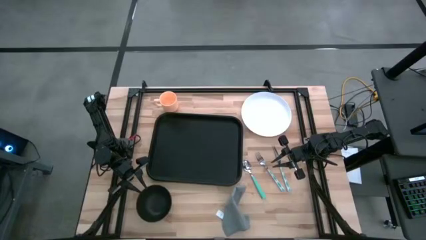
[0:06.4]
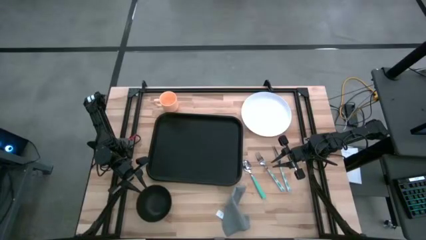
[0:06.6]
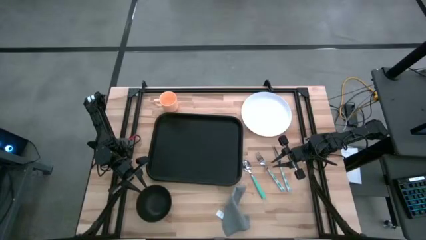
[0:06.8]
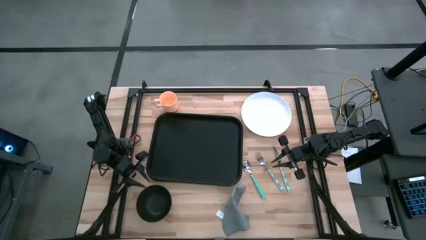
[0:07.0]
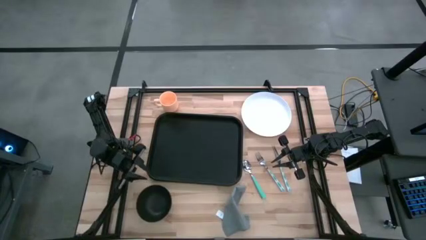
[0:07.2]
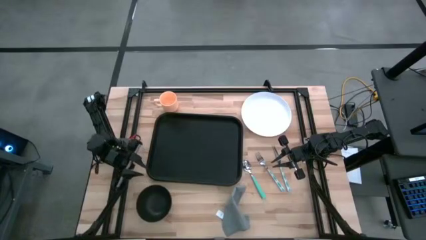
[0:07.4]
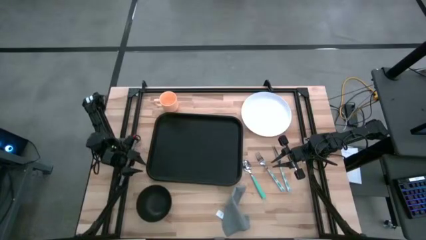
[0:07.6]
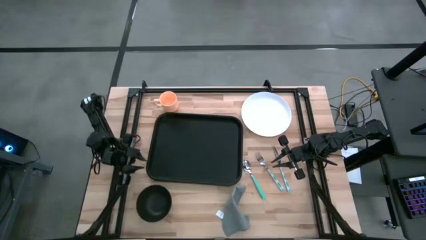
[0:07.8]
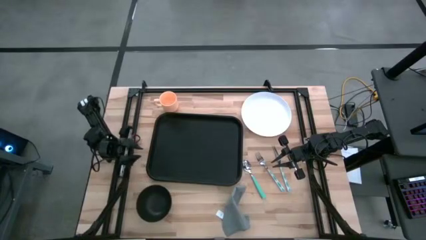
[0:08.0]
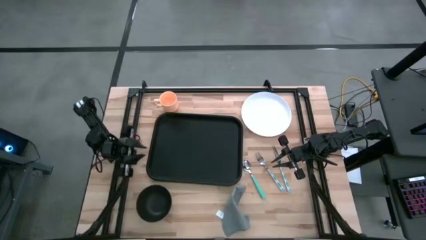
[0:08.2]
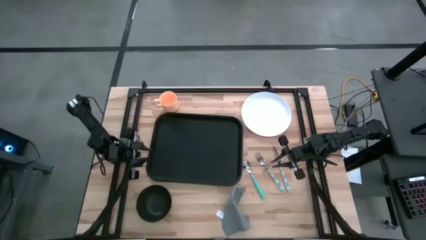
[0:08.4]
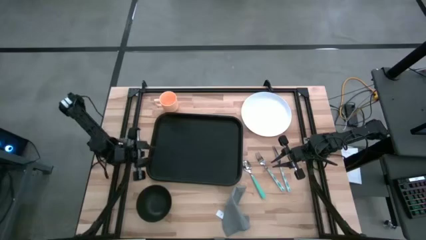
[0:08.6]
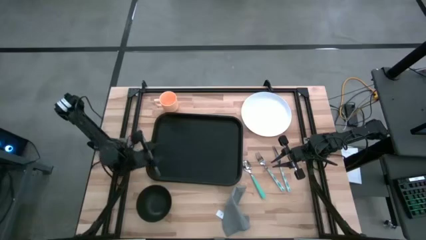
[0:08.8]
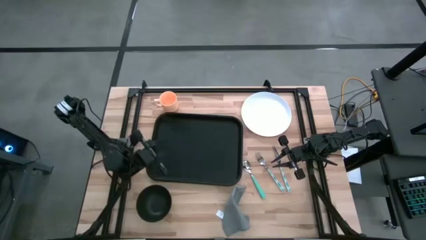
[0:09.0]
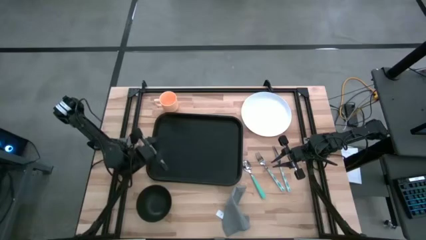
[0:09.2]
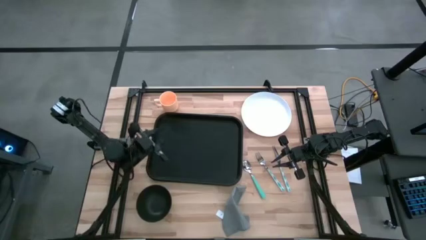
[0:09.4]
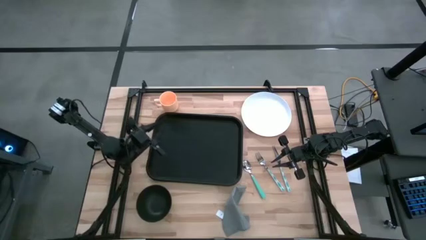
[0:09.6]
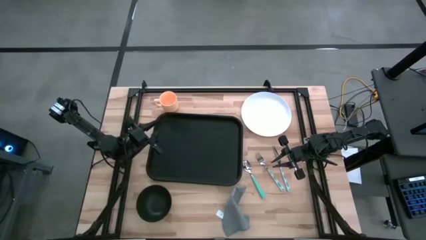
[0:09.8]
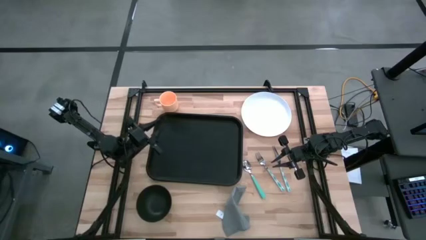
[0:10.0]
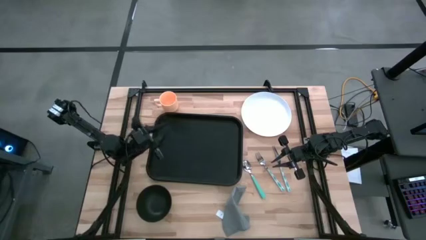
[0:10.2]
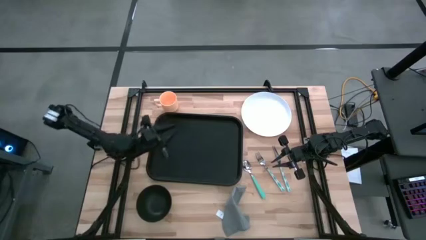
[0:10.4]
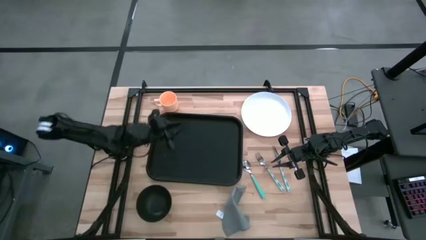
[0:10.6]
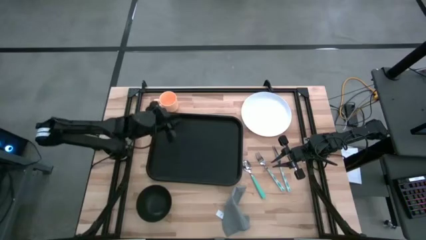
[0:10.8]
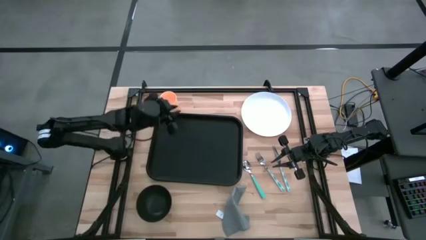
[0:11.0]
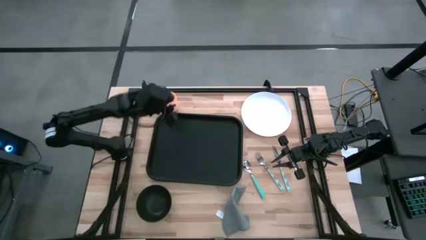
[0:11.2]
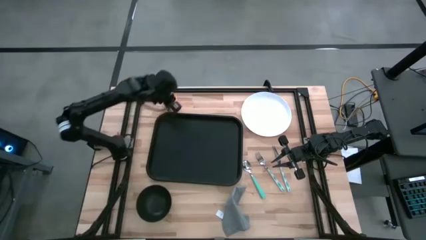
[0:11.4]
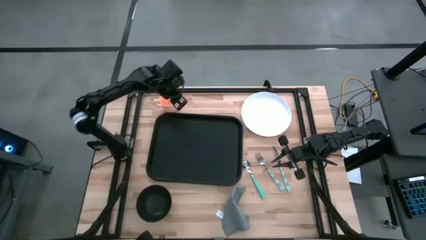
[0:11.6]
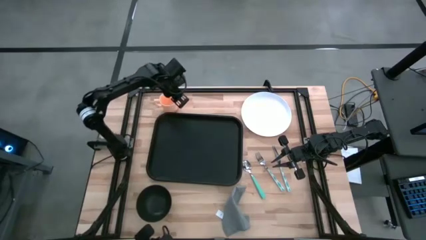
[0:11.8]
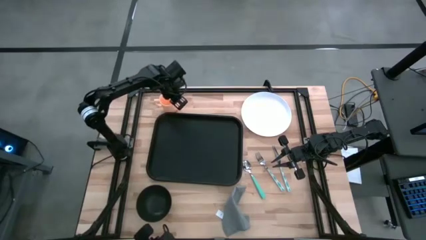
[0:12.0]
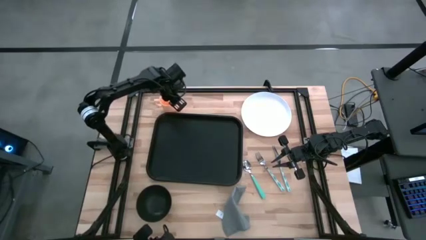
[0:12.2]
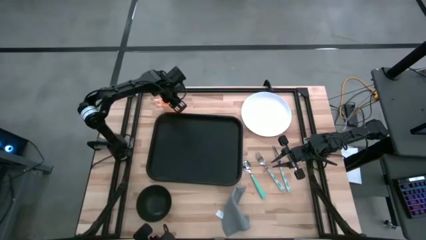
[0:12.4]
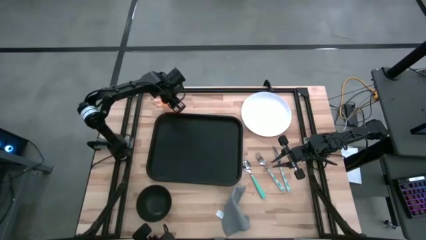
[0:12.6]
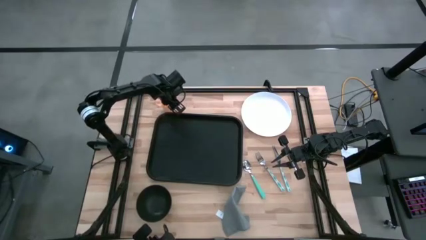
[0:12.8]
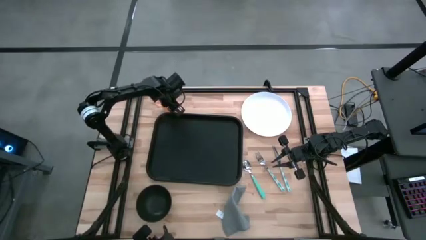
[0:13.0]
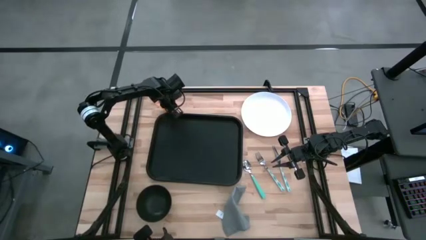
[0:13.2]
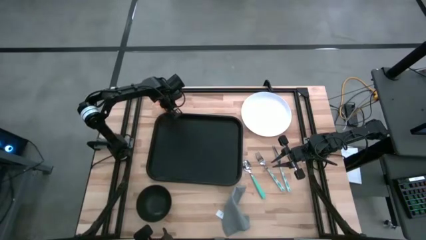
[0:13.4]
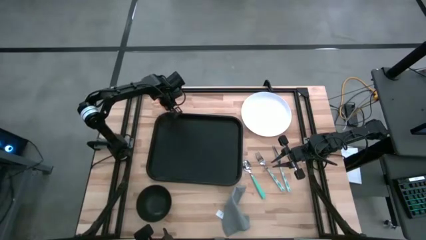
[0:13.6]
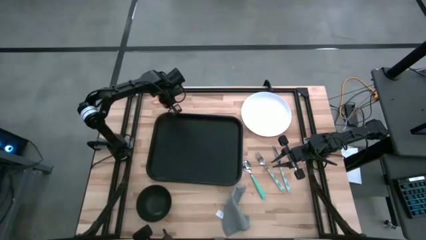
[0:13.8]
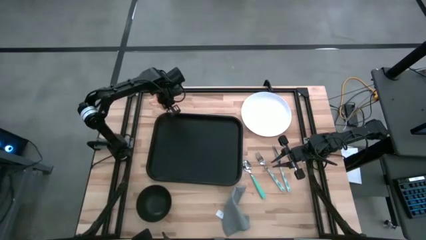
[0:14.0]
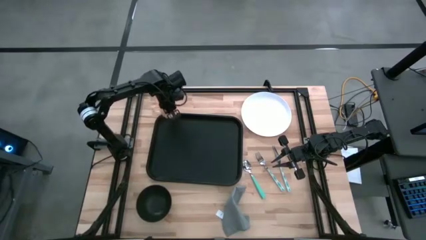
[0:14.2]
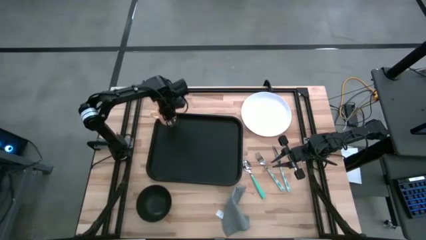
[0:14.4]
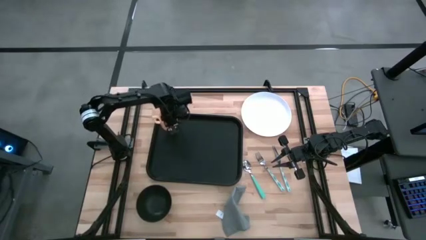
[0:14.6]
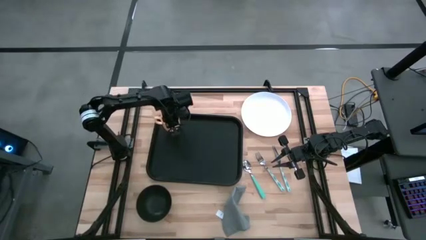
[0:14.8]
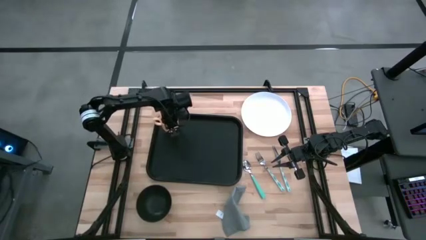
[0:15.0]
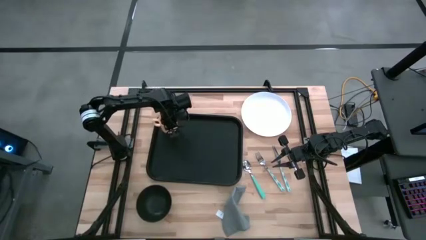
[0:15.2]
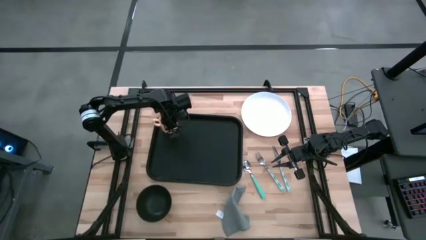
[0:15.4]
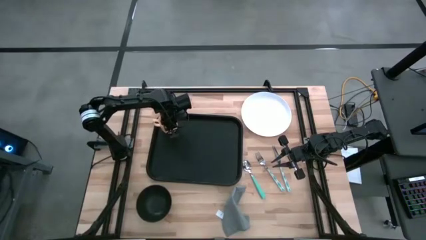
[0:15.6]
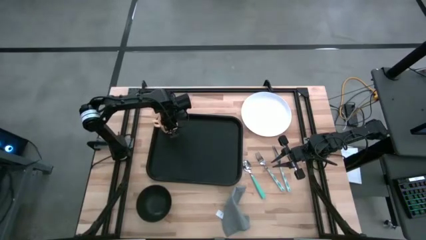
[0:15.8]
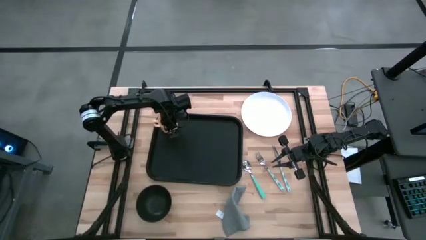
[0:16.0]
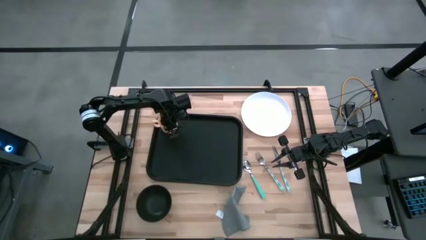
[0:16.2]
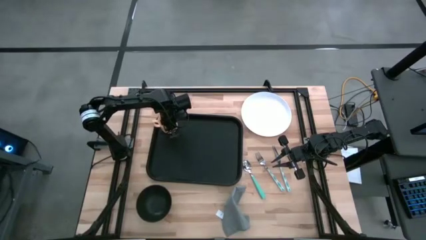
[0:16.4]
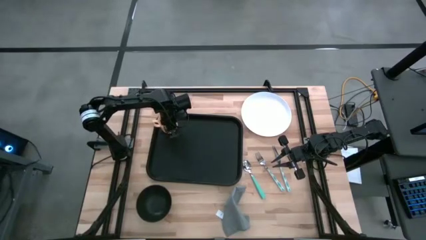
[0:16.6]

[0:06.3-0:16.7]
Task: Set up tray
Put the orange cup on the top left of the black serving tray
